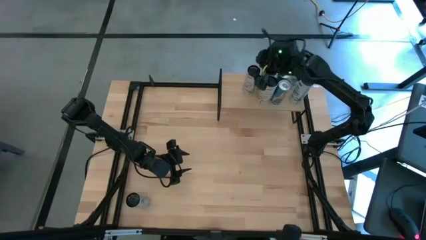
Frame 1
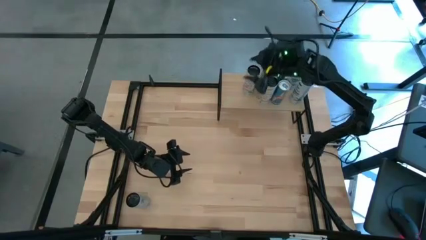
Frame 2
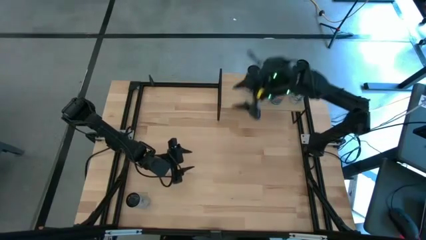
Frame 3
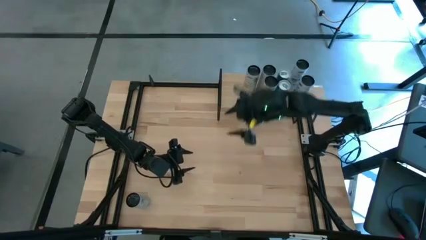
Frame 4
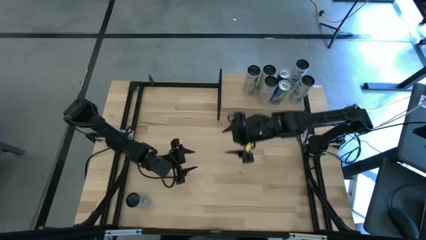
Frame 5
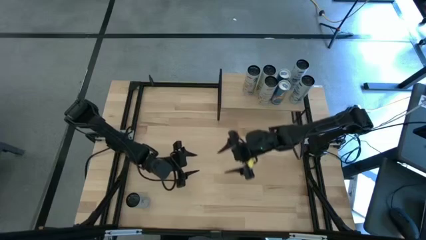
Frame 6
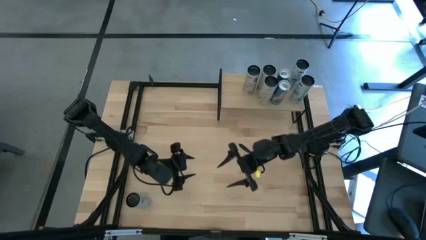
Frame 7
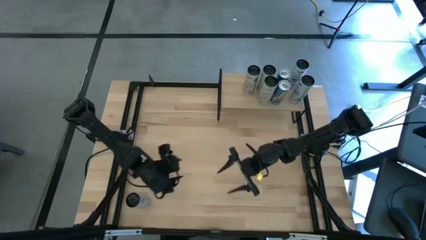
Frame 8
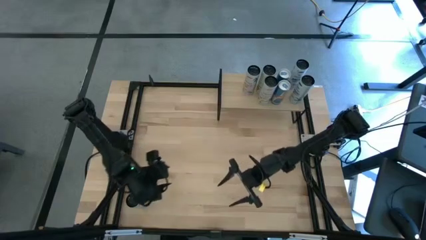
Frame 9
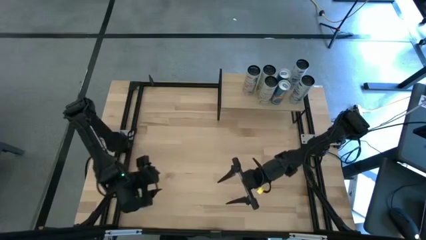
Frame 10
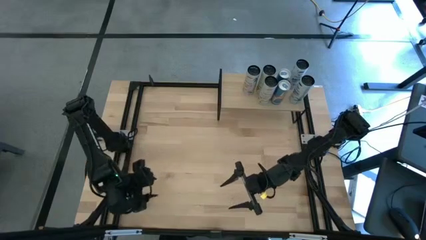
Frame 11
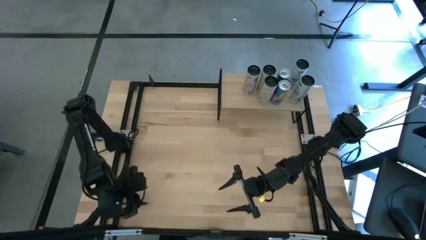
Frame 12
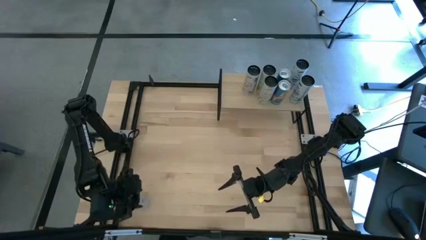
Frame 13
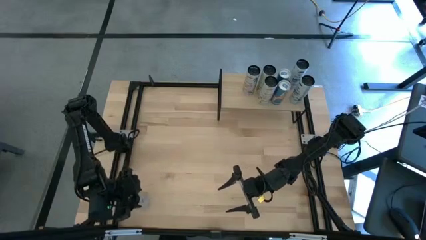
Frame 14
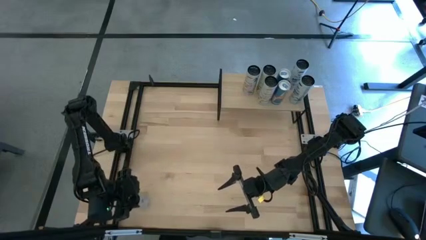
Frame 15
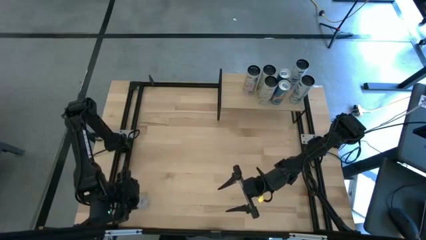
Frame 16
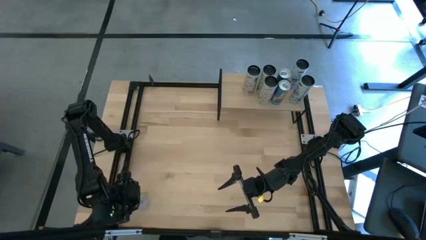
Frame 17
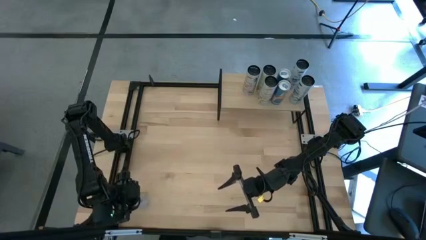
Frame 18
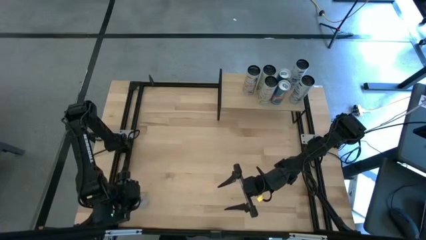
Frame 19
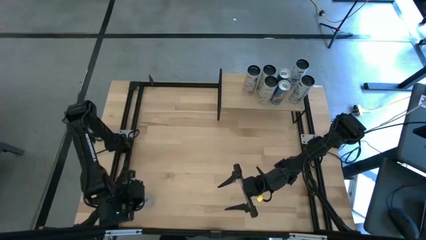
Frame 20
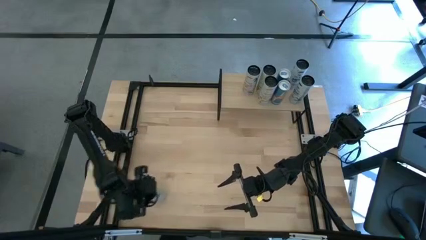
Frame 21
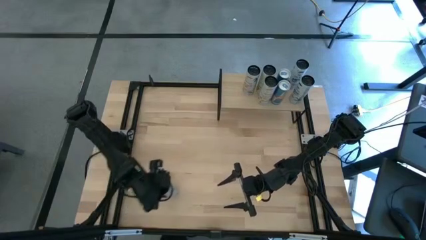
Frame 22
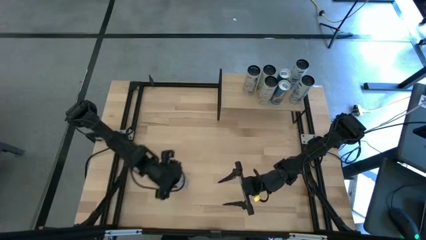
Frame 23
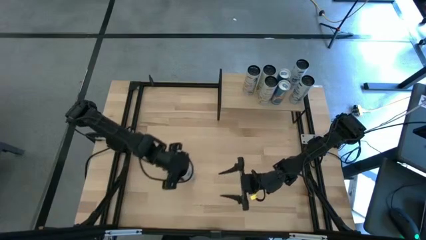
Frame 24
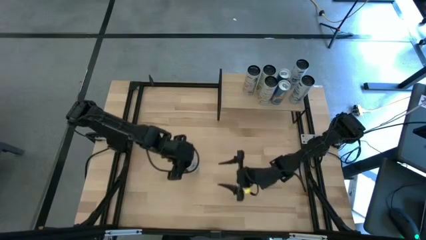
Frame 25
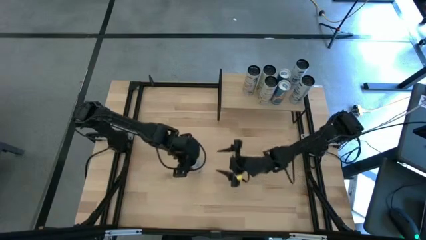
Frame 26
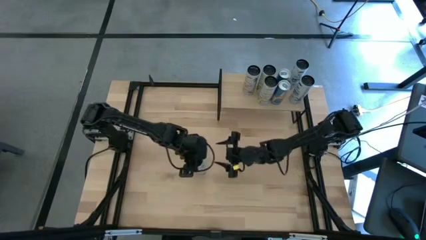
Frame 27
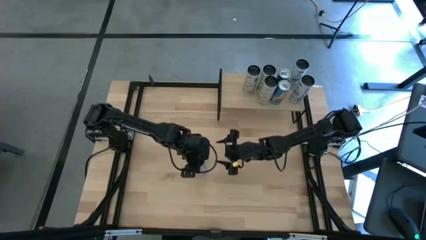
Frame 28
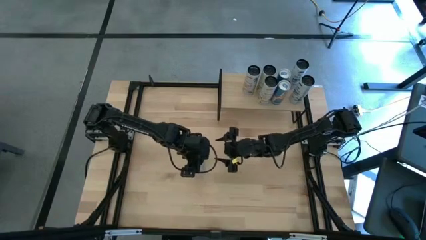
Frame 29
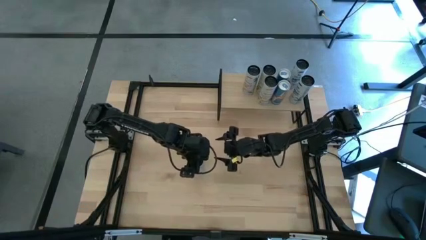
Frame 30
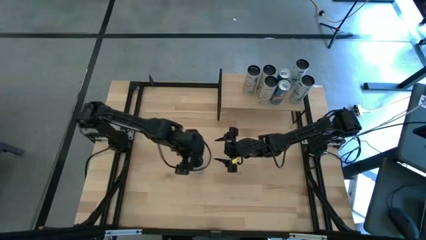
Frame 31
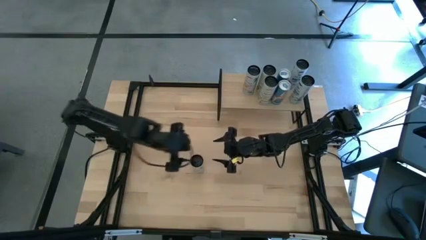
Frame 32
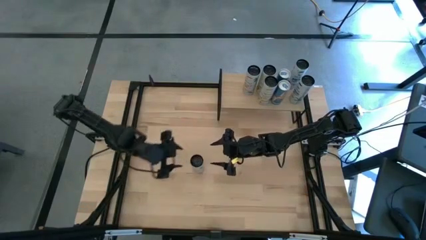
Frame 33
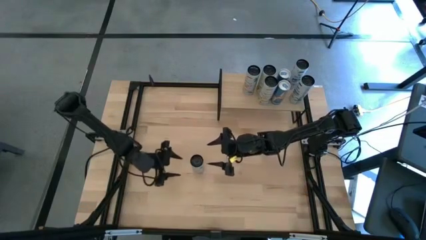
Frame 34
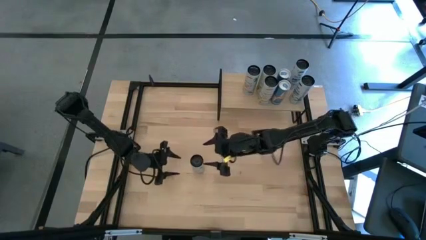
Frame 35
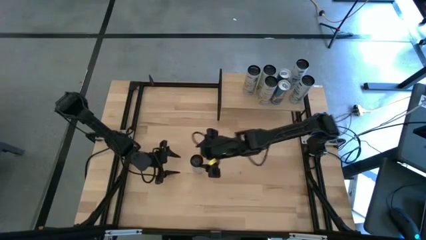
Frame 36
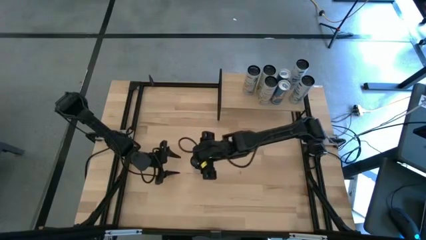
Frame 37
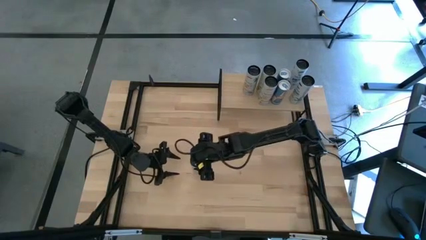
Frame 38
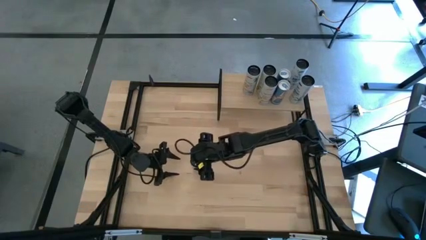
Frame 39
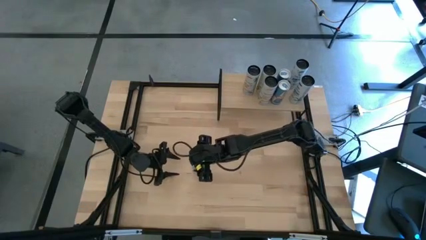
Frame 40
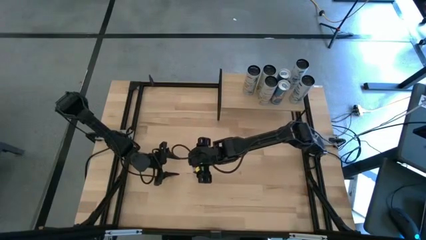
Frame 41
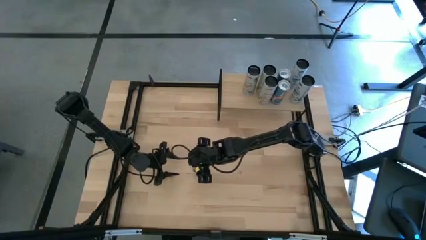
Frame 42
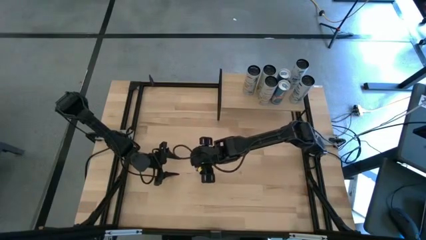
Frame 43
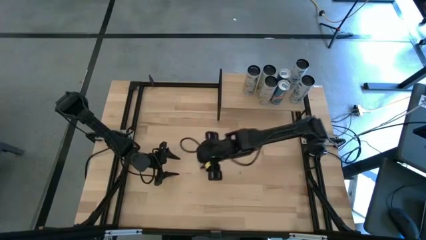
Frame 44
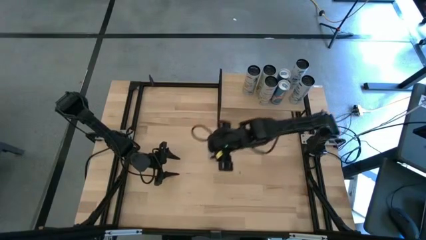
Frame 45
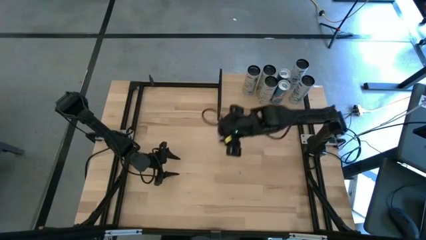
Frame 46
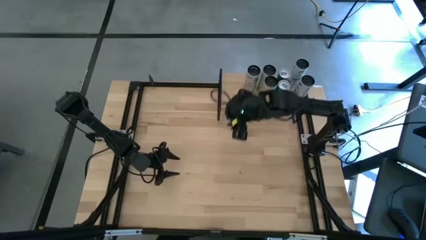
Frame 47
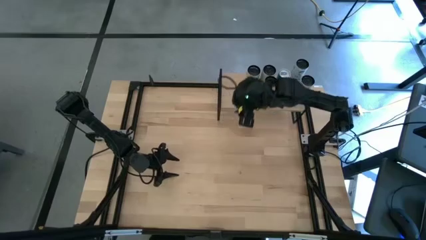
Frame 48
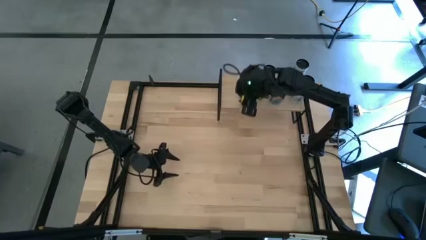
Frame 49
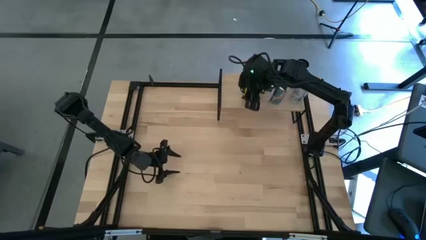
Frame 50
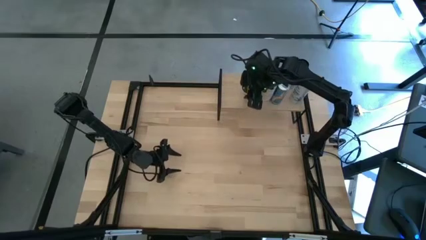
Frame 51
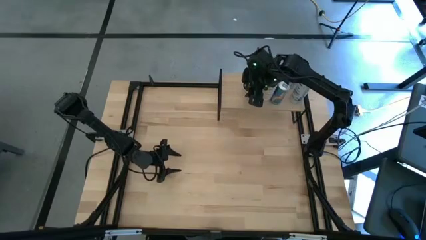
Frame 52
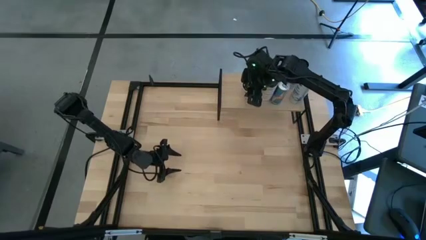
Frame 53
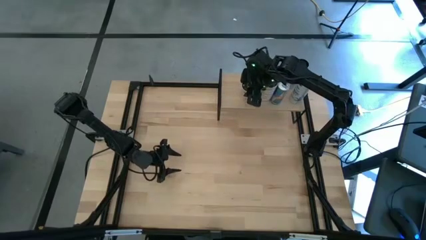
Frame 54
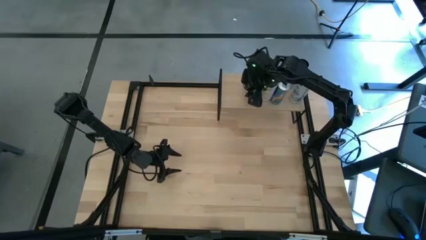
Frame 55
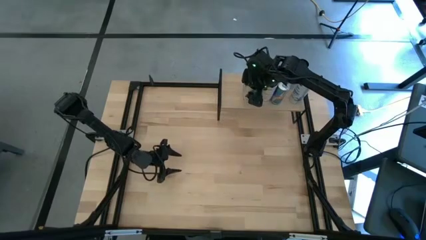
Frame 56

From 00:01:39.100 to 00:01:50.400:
Task: Place canned beverage on shelf
Put the white and pink soda can on the shelf aligned with the other white and pink soda can

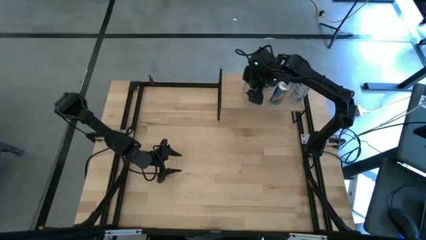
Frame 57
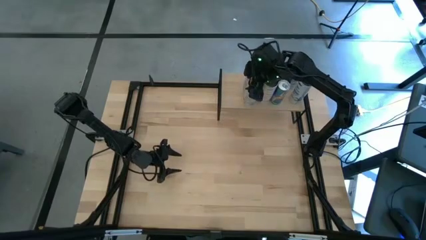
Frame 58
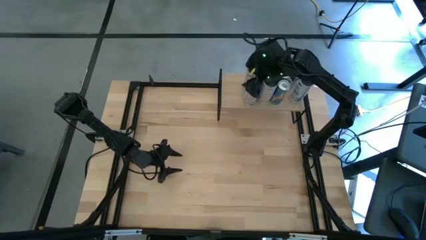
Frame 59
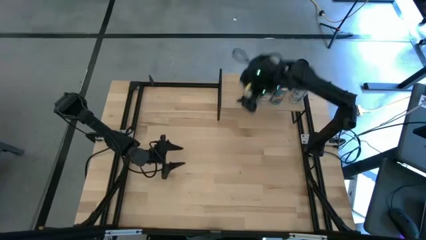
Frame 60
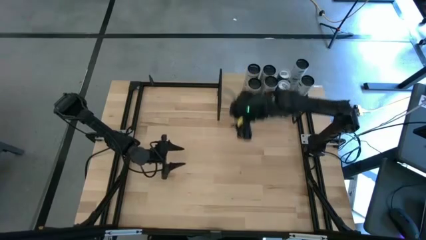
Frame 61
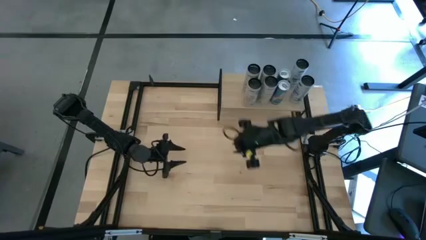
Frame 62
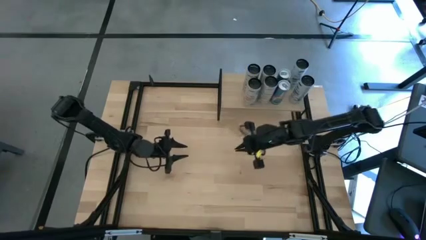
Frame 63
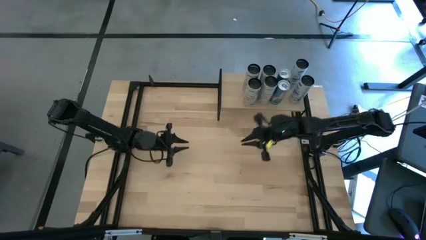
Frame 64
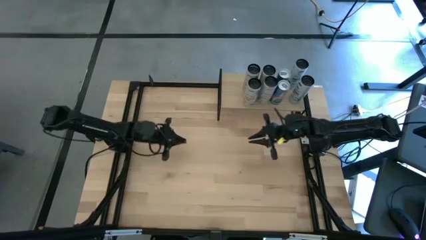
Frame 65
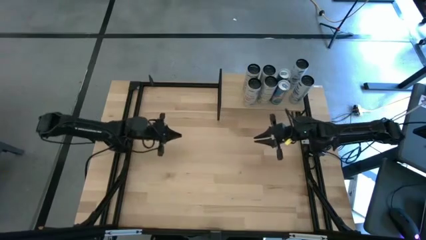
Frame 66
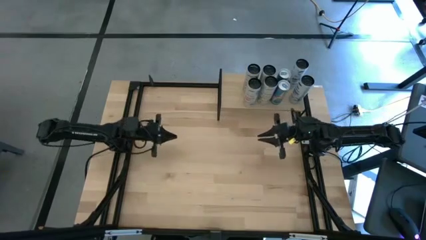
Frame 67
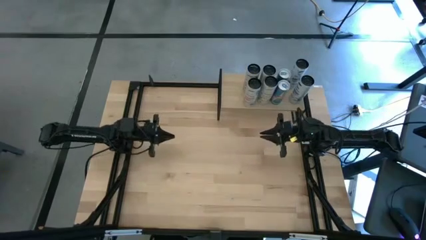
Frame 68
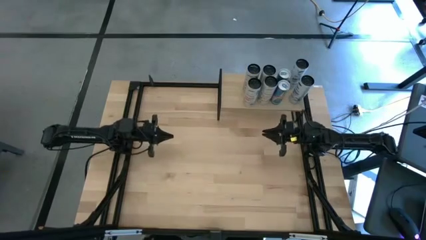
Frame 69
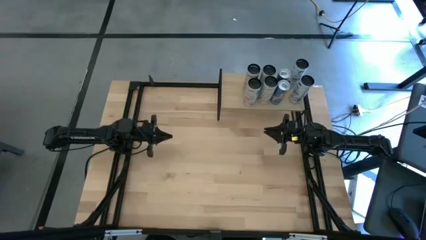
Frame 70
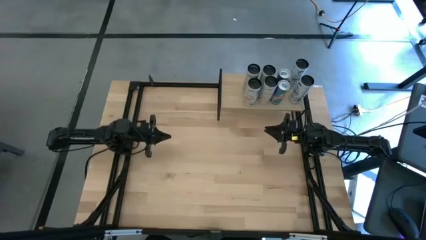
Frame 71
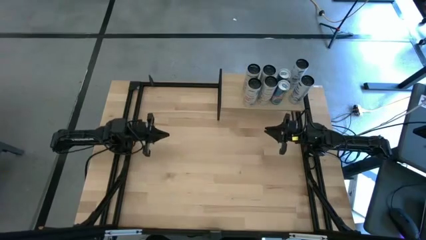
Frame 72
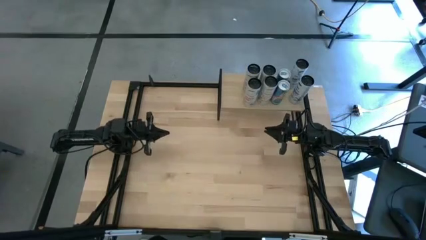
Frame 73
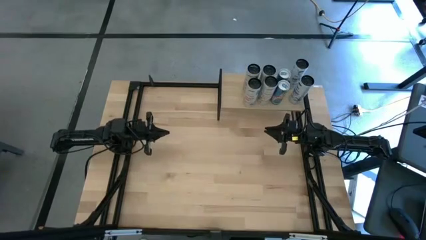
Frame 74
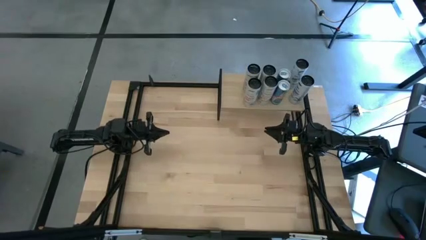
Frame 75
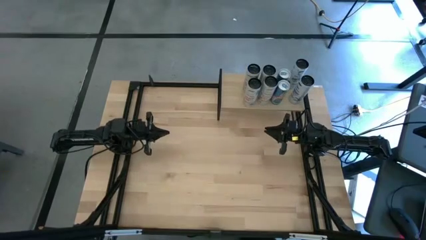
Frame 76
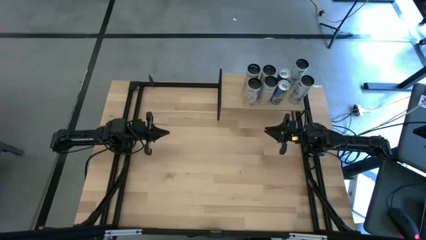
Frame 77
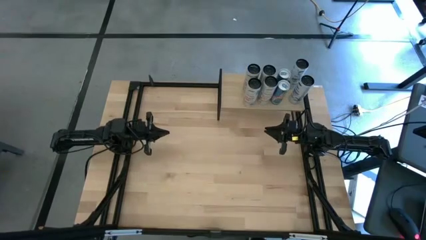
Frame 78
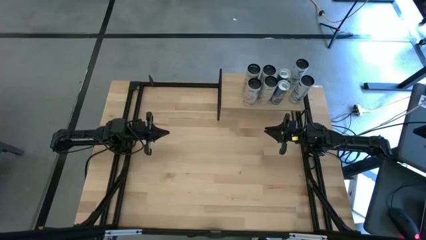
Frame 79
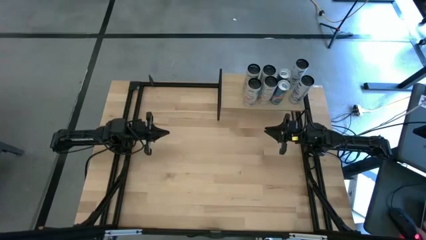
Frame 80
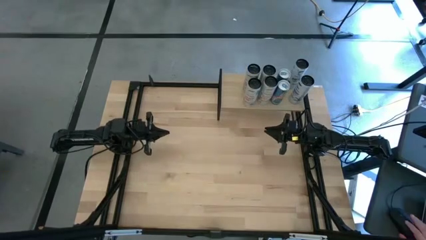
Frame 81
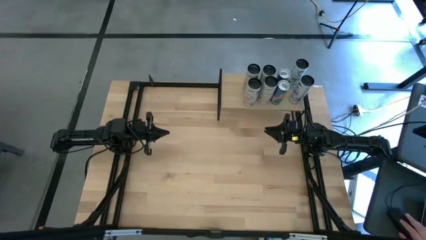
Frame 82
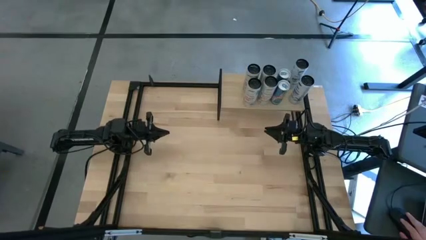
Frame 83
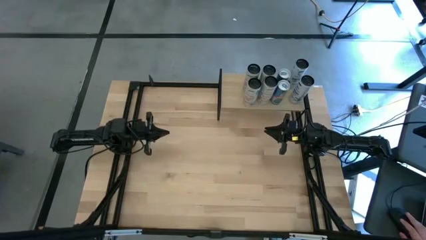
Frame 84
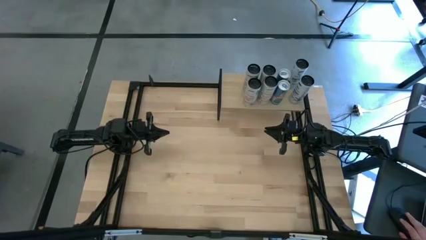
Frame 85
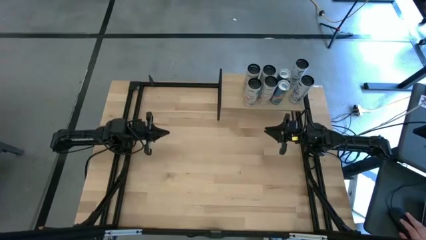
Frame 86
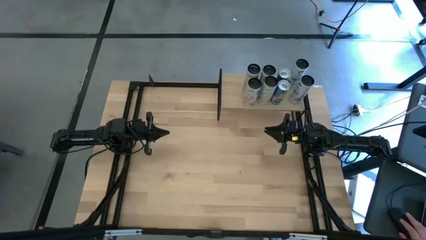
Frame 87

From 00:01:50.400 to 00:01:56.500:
Return to Home Position
